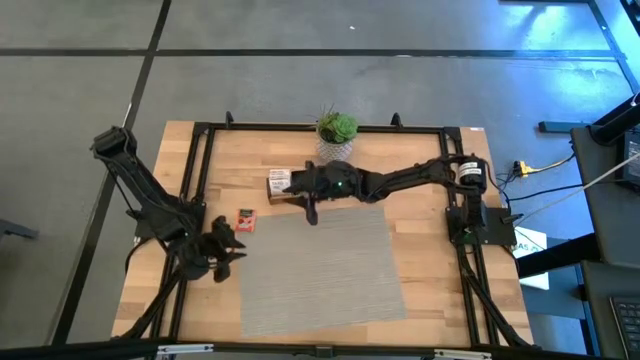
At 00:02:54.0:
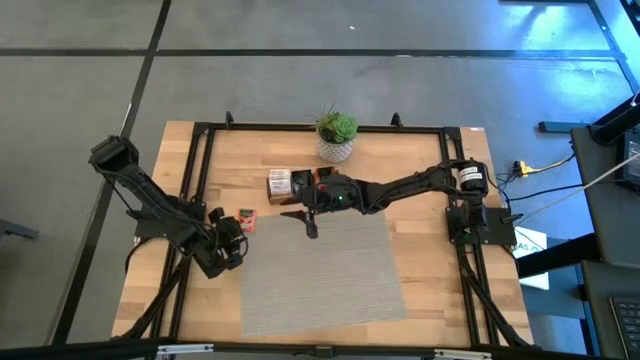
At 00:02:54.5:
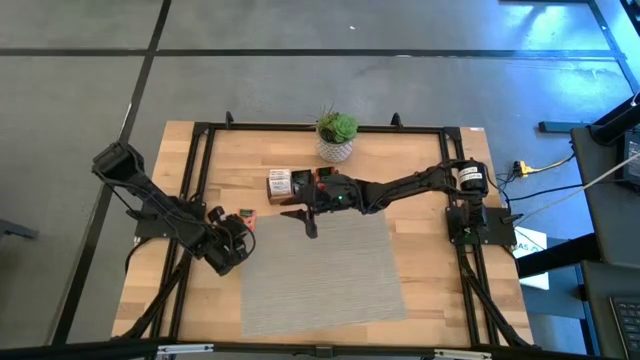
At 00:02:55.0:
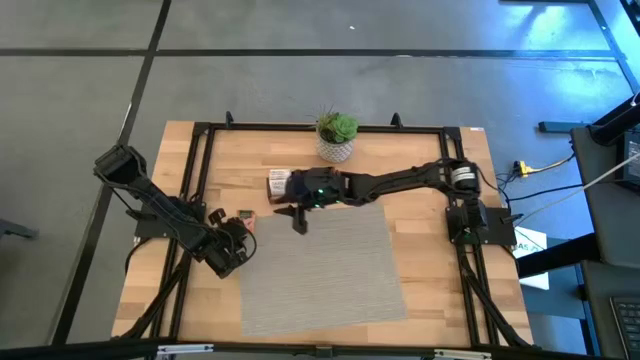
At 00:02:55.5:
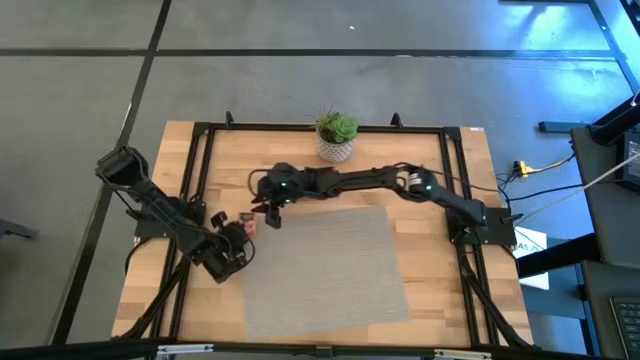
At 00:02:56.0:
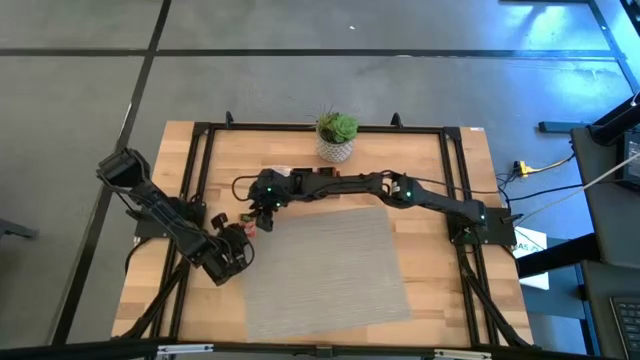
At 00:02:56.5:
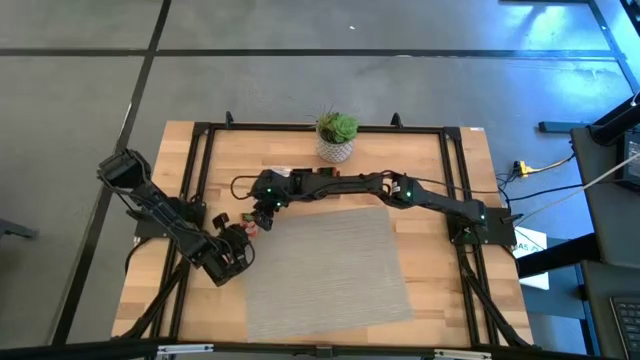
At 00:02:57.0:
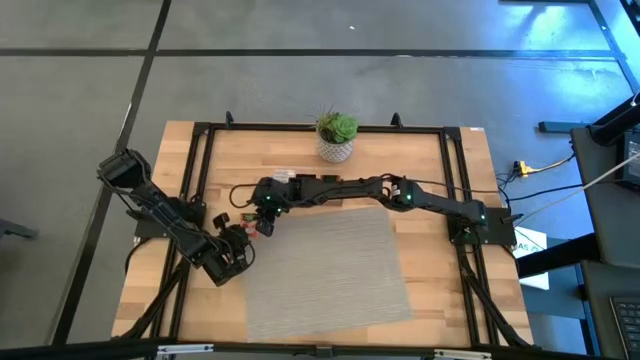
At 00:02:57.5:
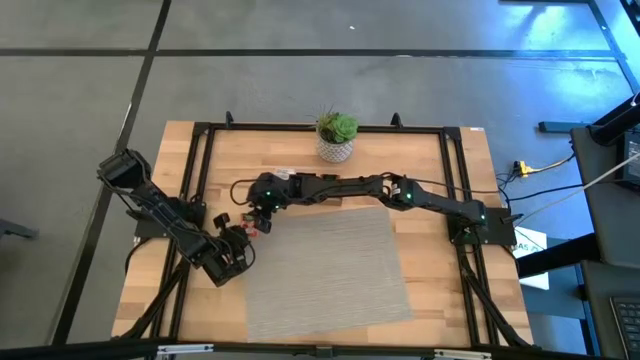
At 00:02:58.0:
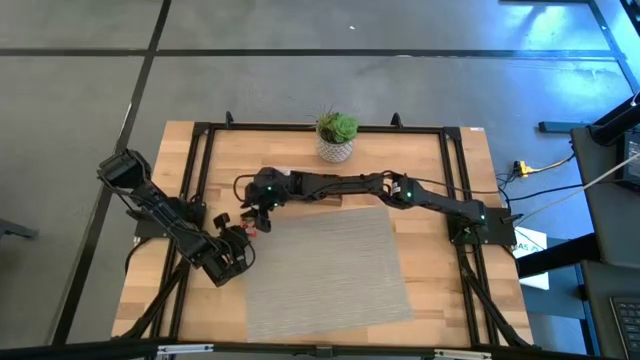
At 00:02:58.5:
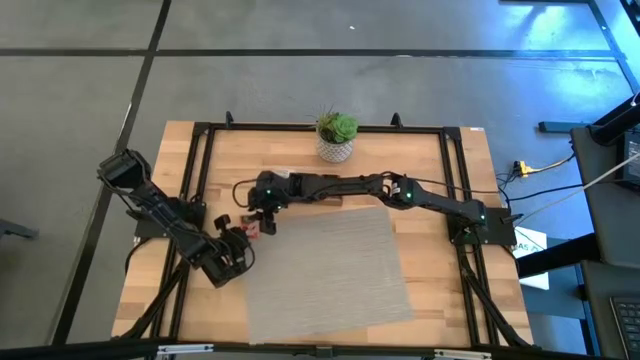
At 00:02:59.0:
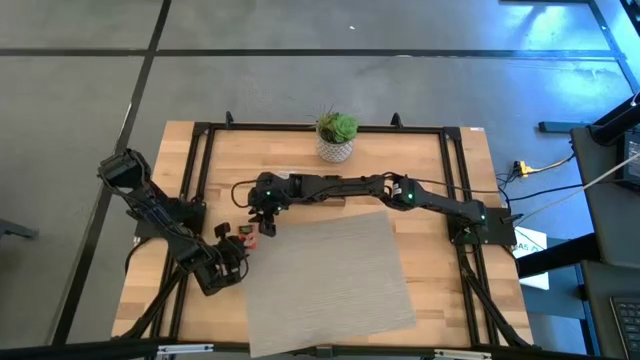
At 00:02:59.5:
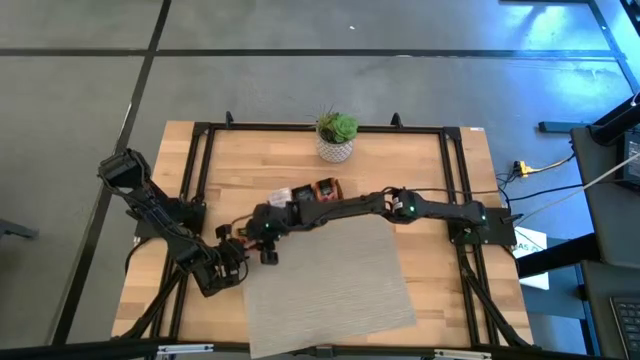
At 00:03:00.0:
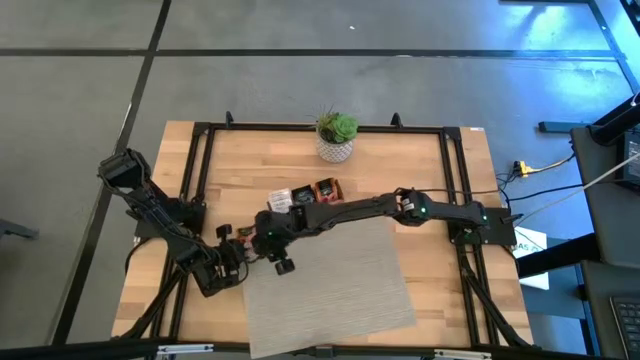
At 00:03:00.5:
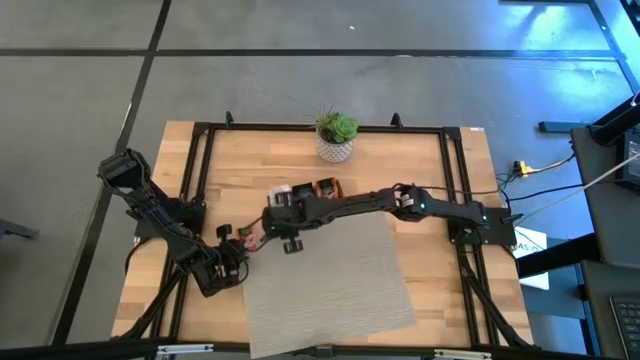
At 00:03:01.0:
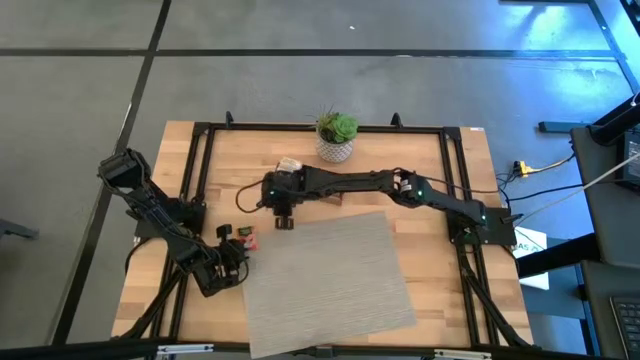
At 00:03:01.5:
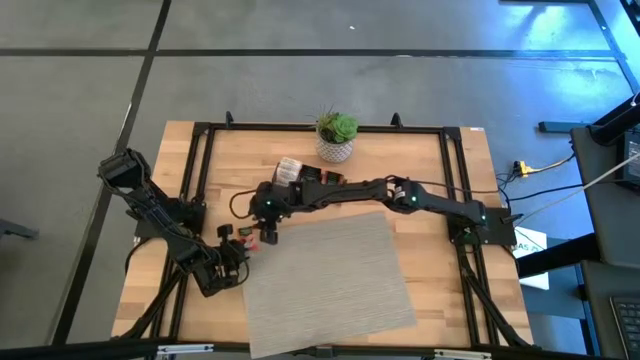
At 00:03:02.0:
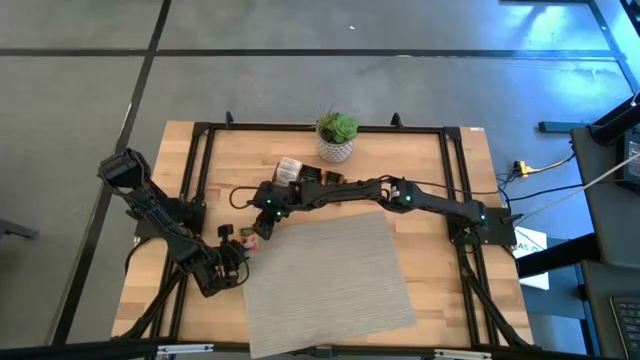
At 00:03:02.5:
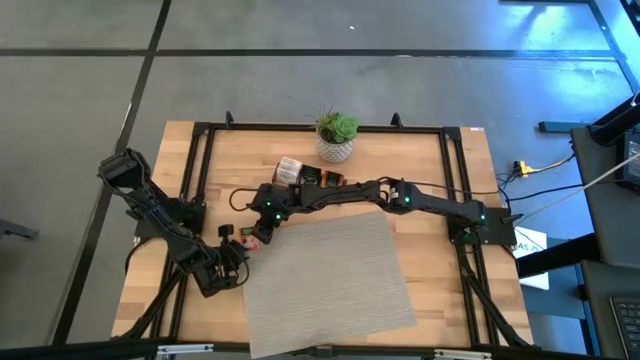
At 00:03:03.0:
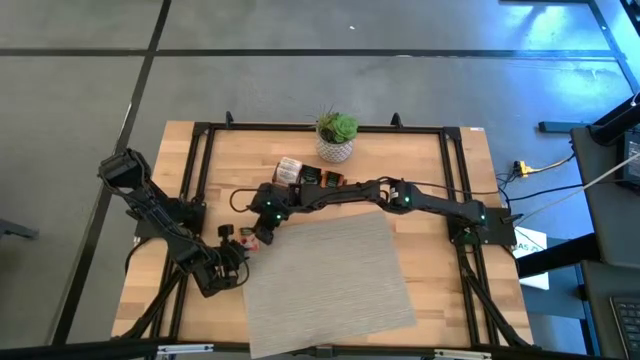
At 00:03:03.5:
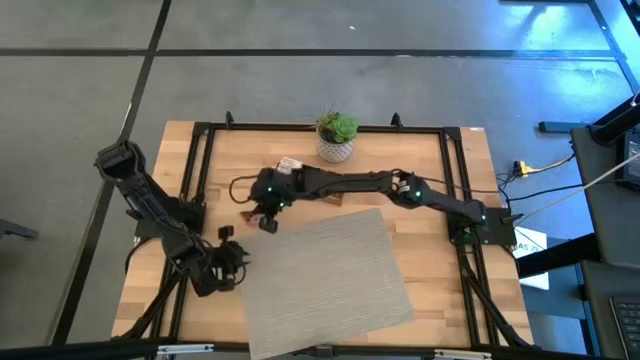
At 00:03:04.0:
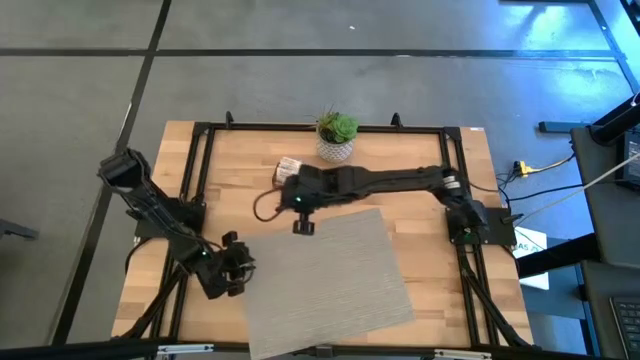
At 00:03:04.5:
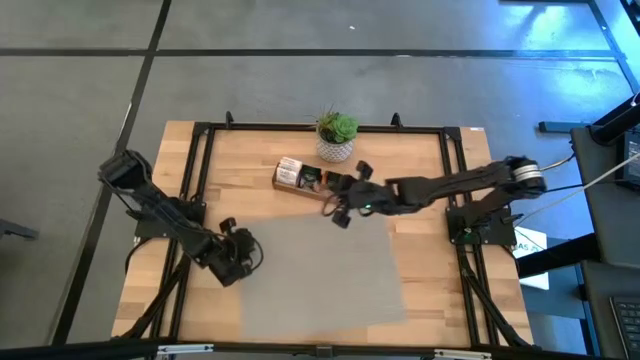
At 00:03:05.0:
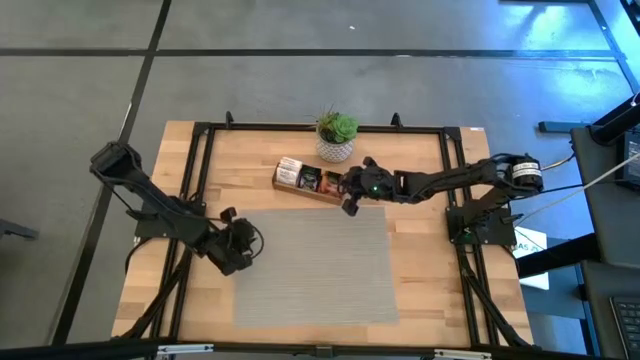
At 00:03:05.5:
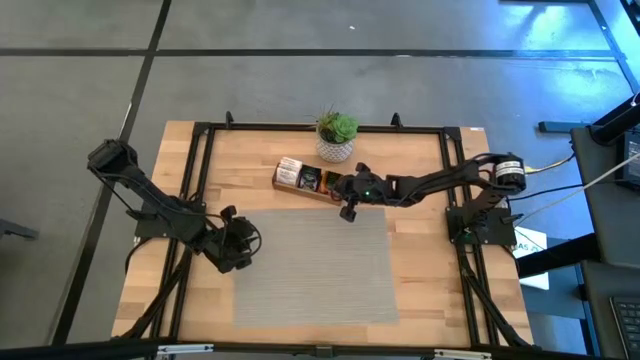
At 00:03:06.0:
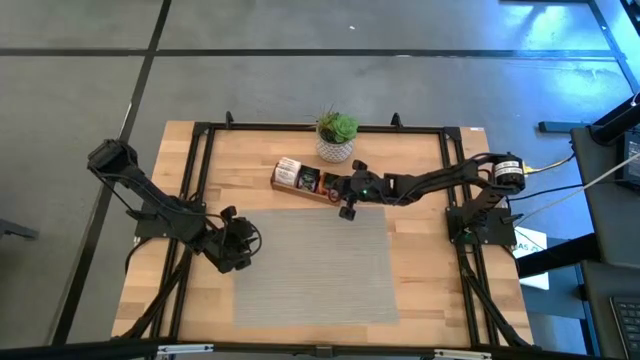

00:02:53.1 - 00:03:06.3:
Task: Pick & Place Tea
Put the orange tea bag into the right section of the wooden organizer

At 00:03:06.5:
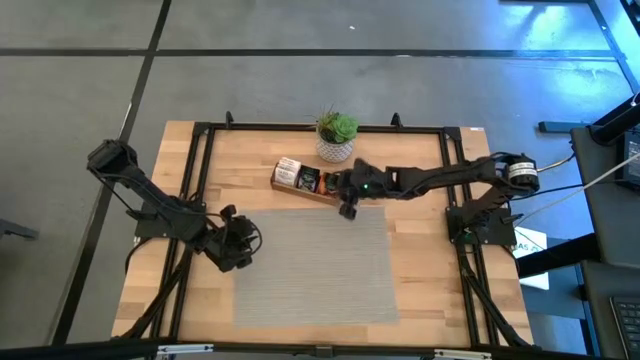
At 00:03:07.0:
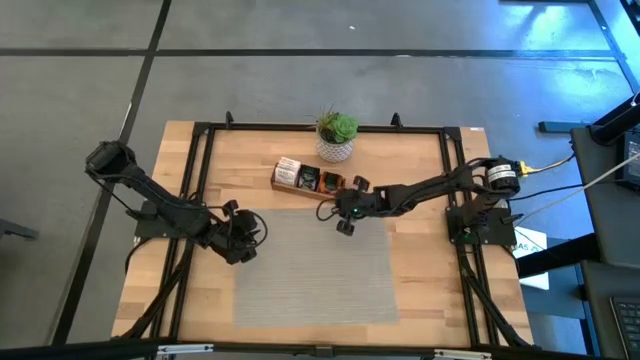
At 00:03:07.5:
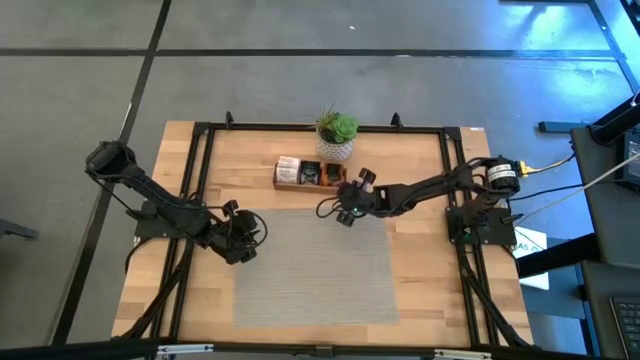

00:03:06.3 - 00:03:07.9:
Adjust the wooden organizer on the table

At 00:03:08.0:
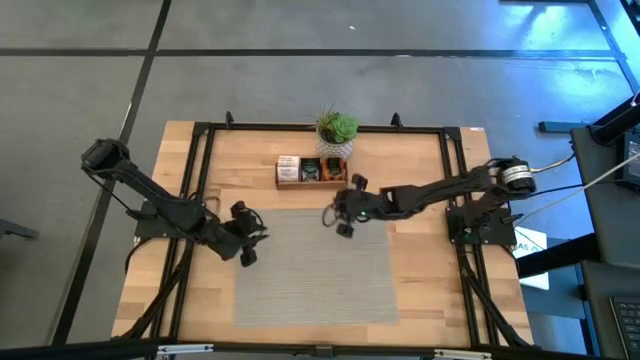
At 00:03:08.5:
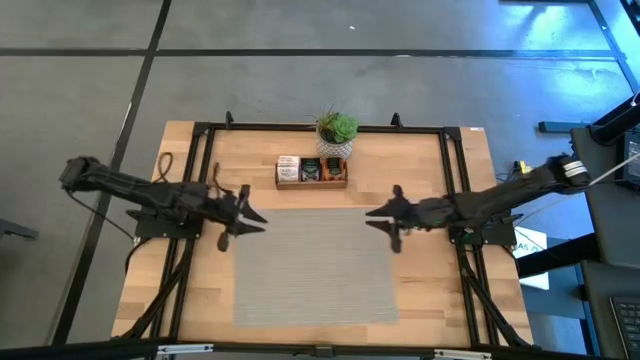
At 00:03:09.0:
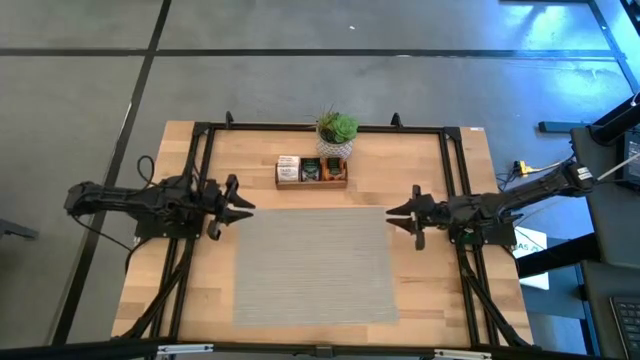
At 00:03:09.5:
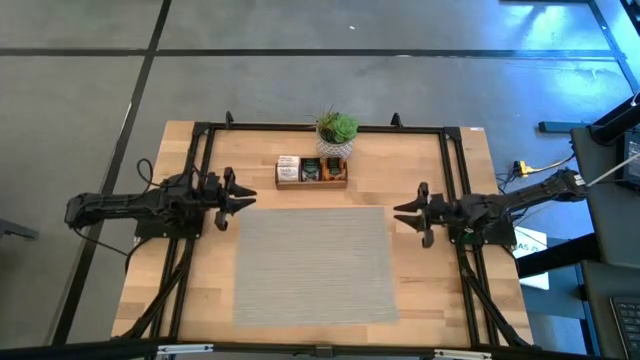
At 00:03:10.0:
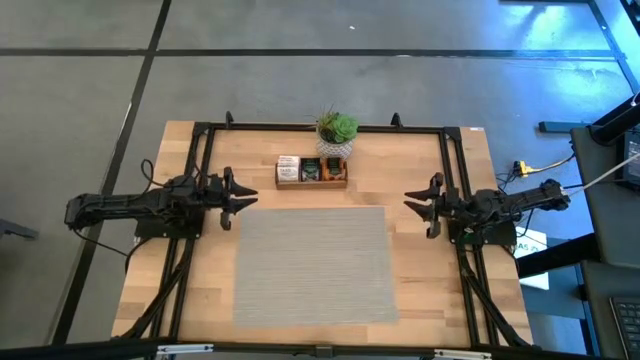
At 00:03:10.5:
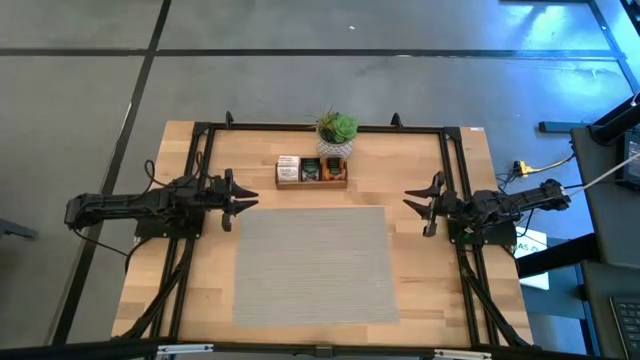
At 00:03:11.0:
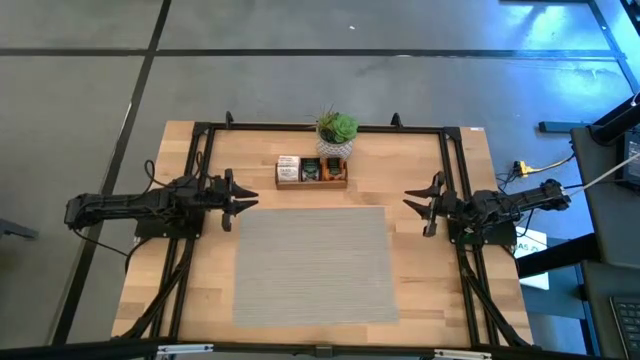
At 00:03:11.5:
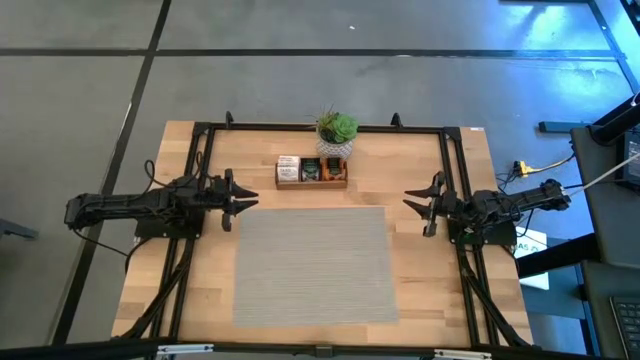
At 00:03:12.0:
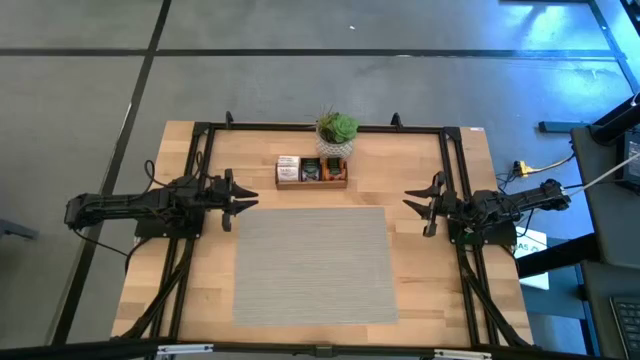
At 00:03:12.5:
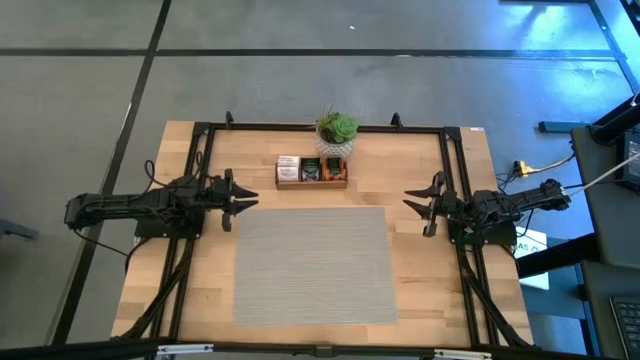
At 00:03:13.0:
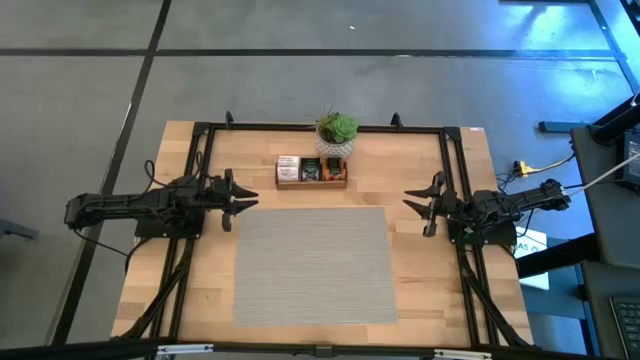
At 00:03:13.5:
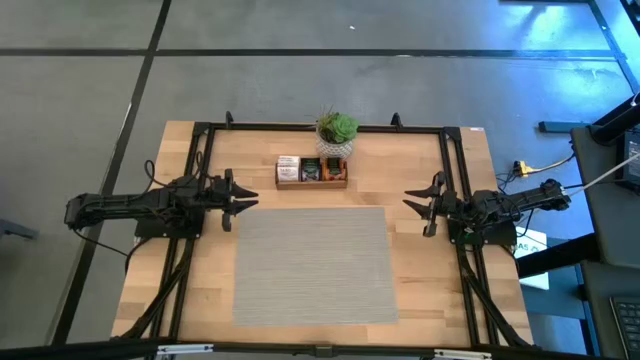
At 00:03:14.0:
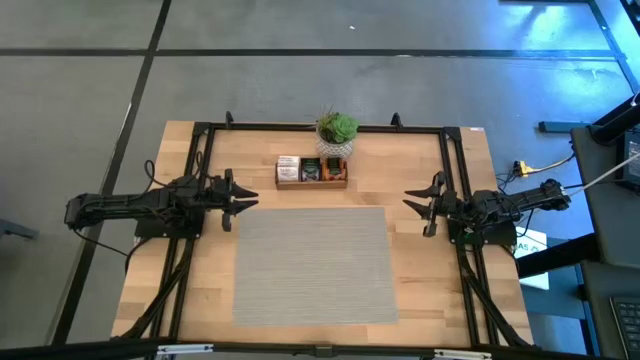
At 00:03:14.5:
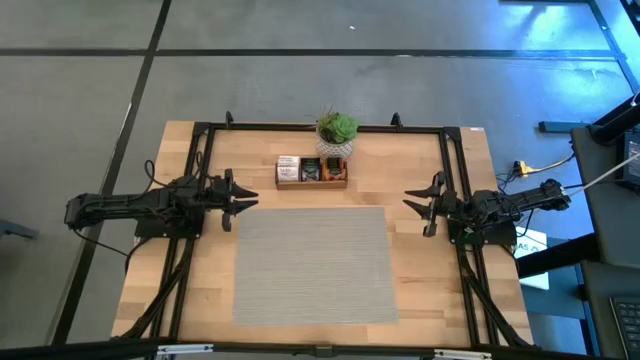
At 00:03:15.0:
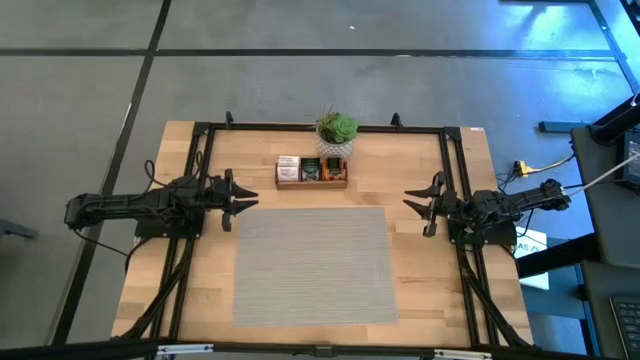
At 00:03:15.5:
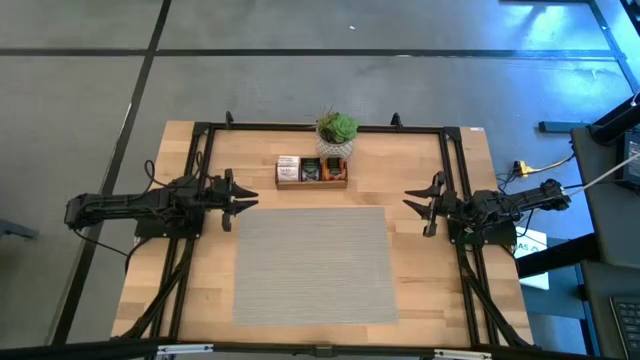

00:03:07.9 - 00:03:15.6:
Return to Home Position
